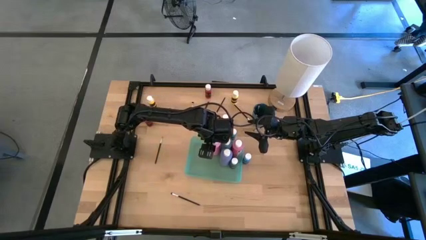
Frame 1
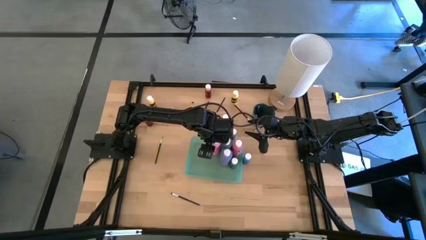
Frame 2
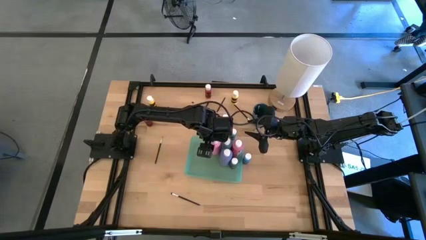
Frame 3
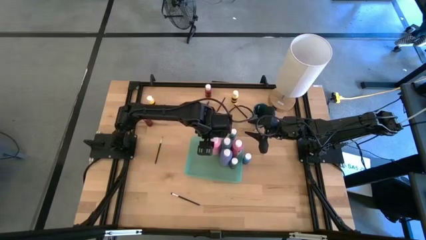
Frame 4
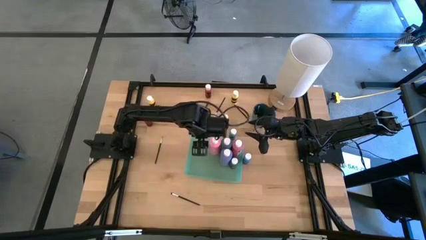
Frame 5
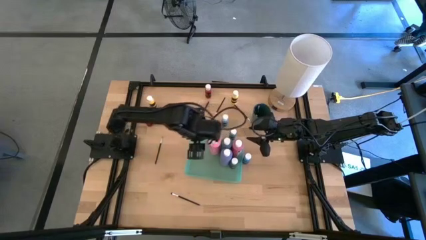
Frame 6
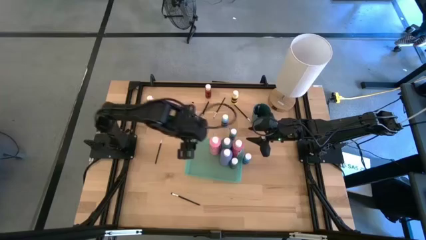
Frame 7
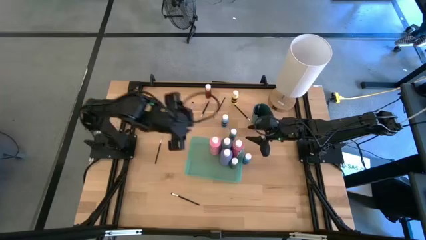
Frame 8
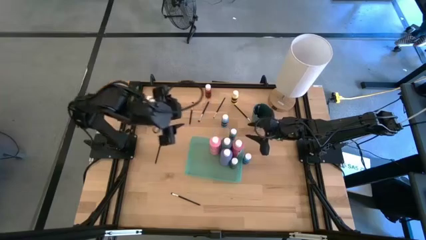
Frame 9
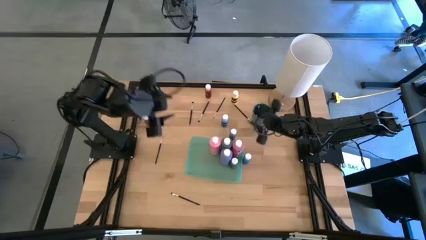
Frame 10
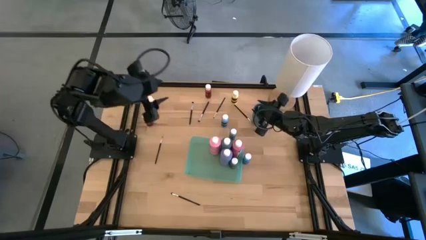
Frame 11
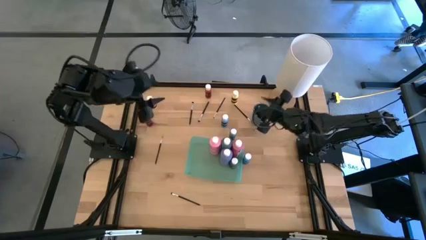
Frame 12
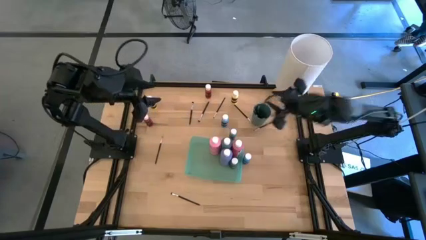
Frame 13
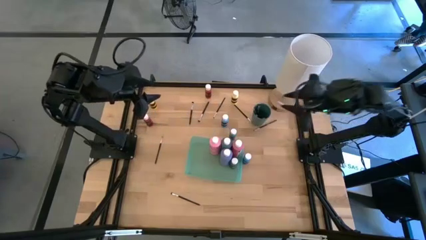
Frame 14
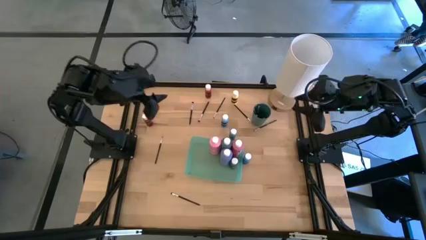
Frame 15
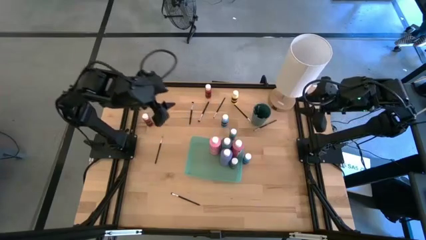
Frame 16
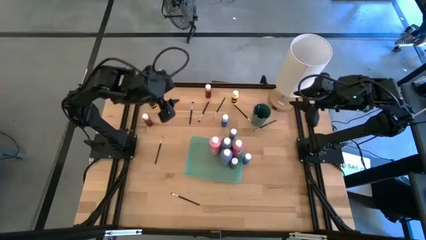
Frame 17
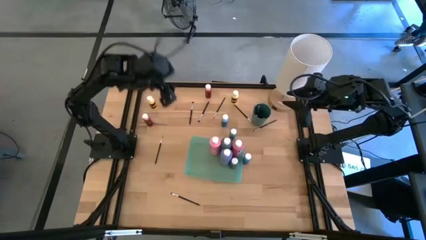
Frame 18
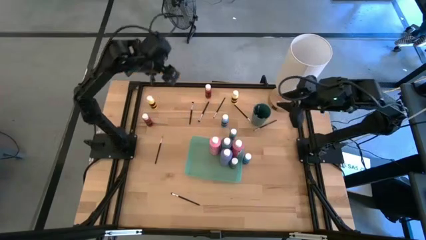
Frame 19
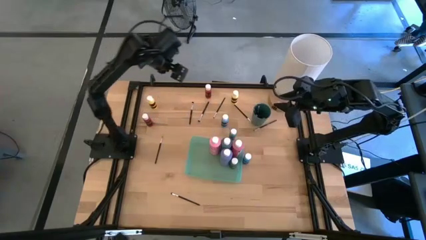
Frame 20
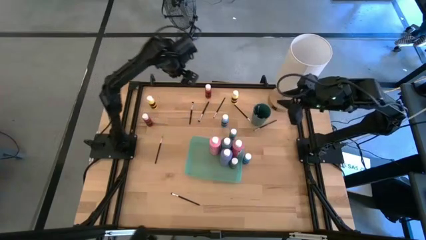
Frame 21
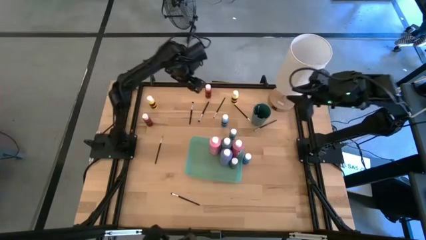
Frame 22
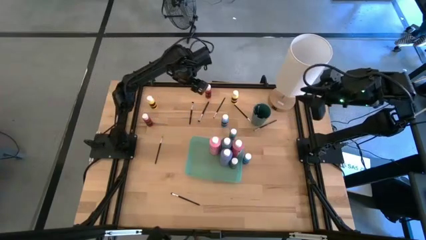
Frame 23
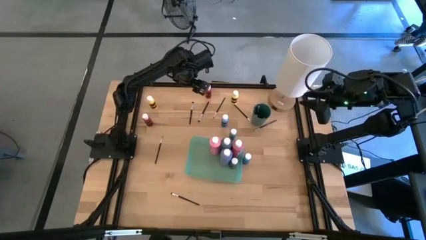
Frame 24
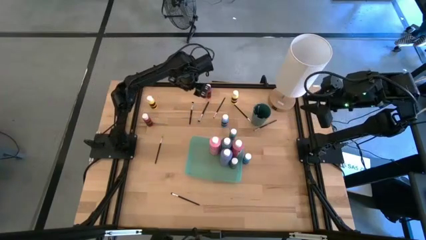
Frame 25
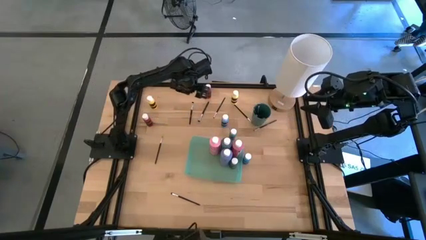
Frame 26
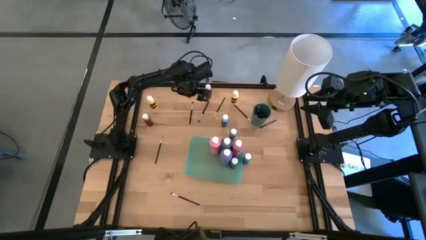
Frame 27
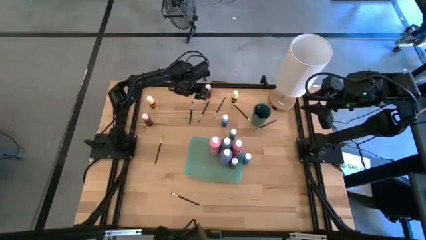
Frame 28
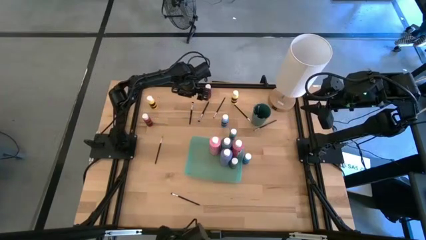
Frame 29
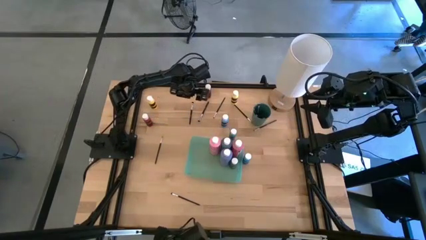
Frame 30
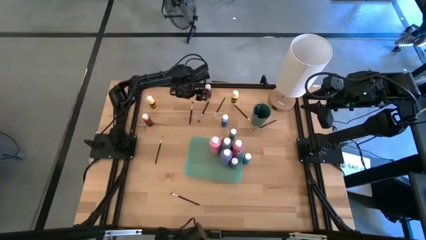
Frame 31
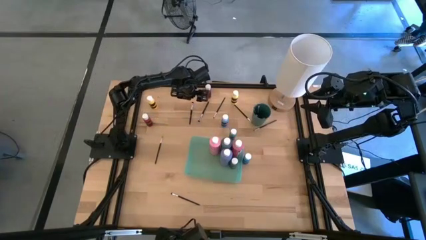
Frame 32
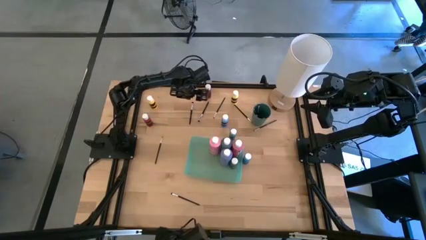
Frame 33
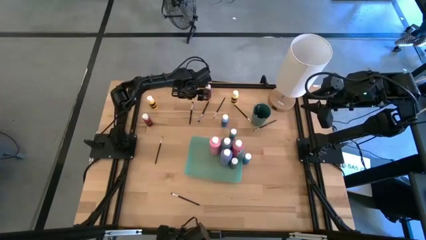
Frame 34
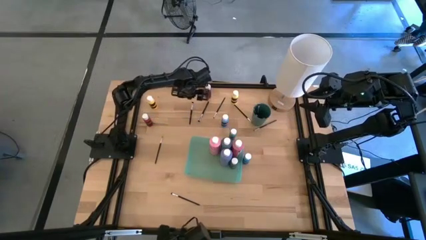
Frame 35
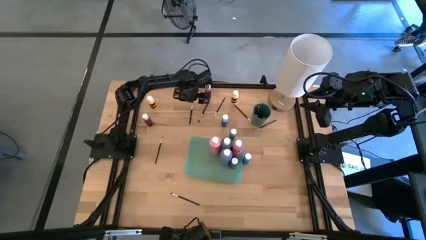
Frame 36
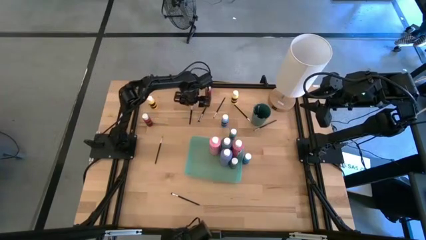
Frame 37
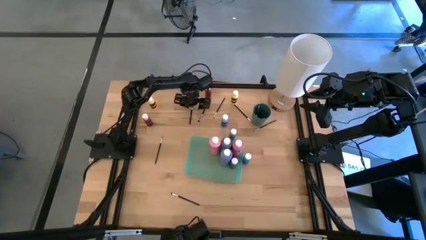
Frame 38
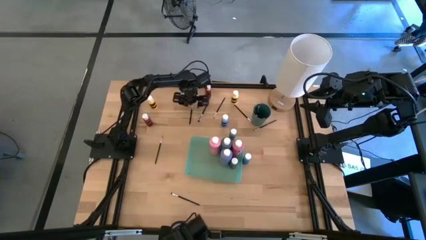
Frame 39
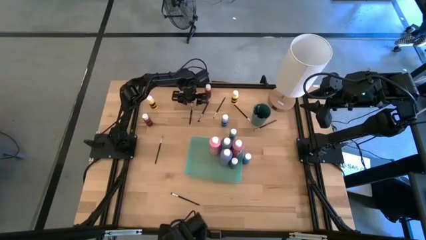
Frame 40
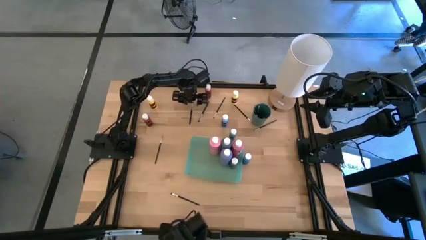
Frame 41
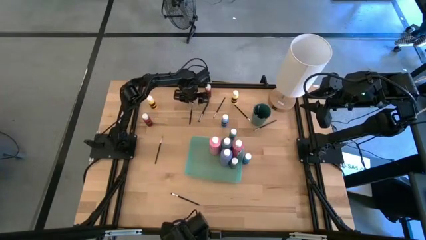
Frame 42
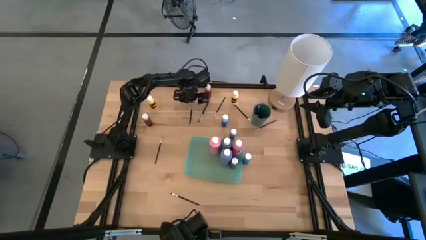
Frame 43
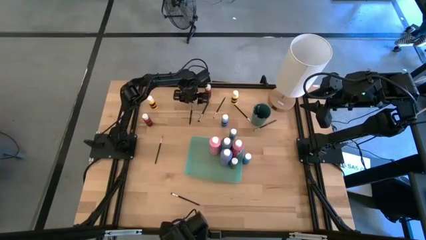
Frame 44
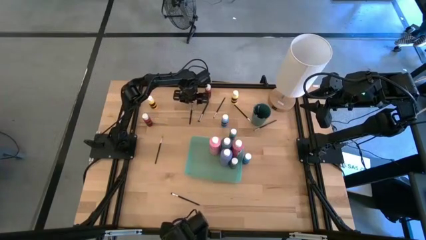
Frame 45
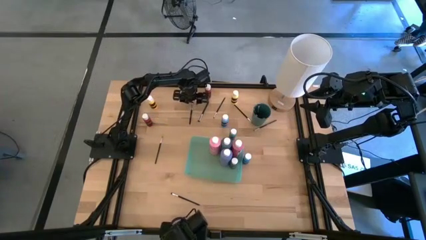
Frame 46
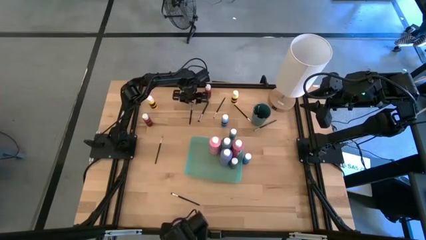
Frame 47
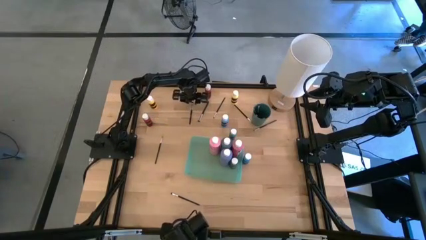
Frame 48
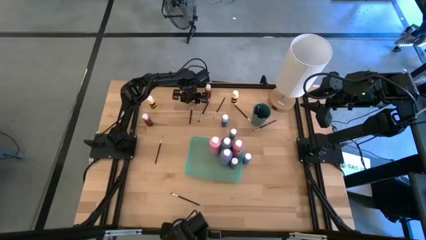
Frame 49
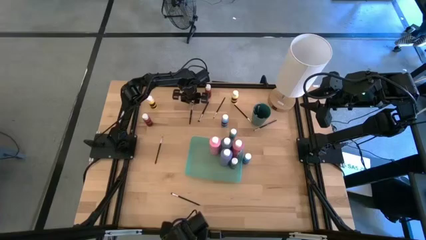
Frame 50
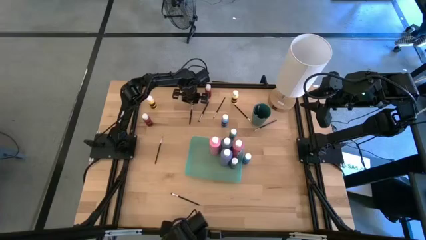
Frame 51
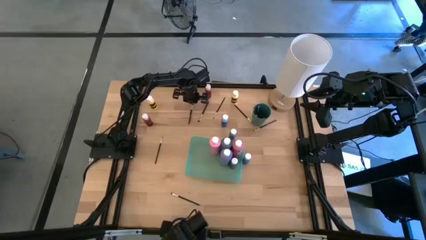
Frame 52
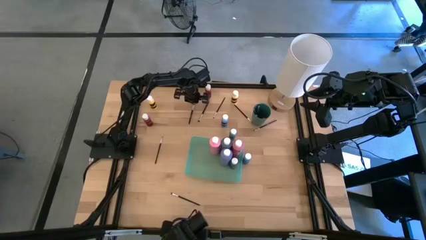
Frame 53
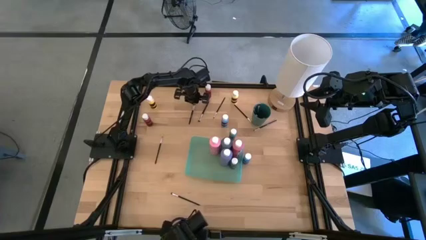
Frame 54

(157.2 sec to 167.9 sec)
Task: Pick & Place Paint Supplies
Put the black eyeshadow brush into the green cup
